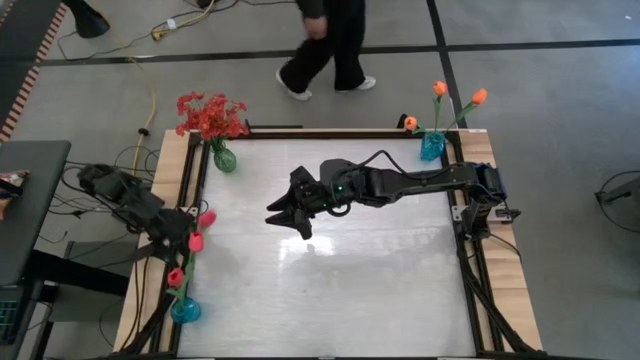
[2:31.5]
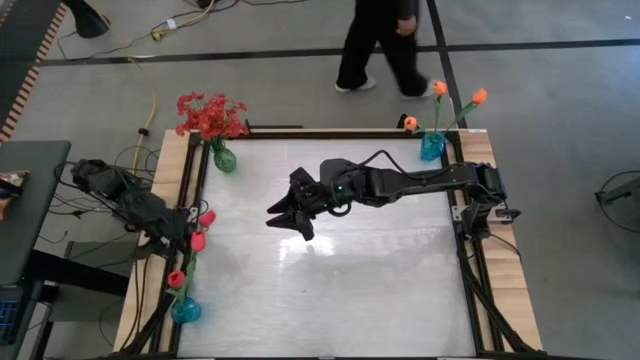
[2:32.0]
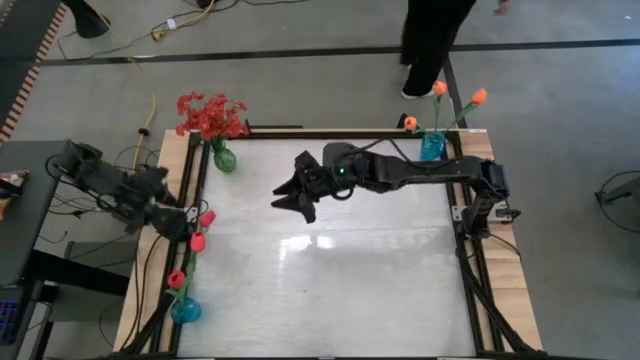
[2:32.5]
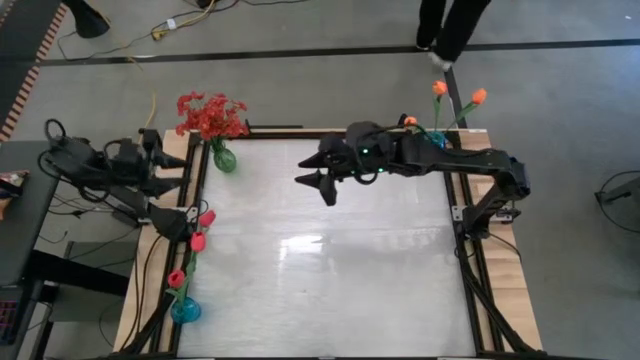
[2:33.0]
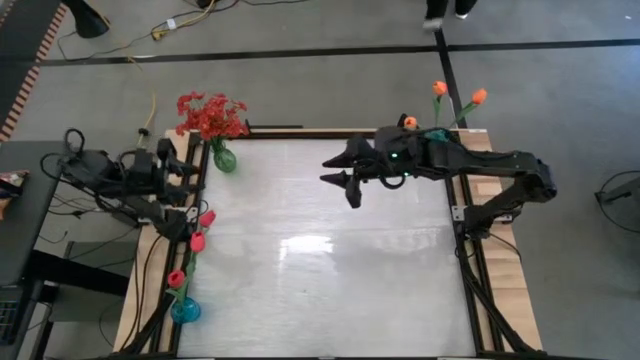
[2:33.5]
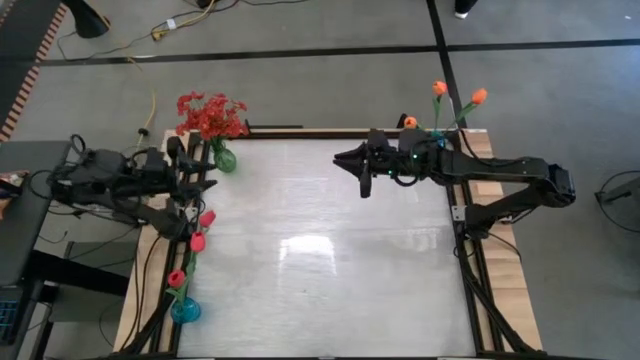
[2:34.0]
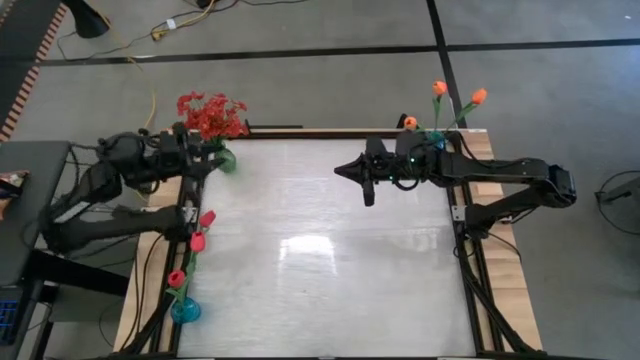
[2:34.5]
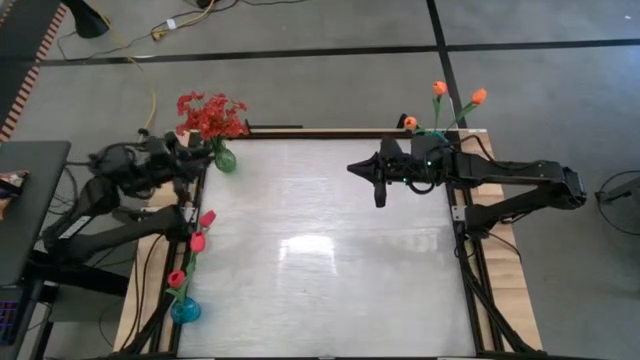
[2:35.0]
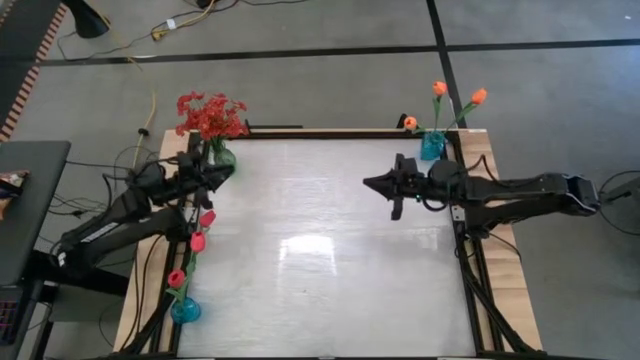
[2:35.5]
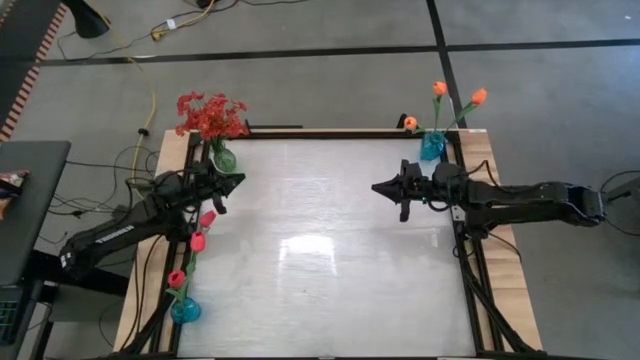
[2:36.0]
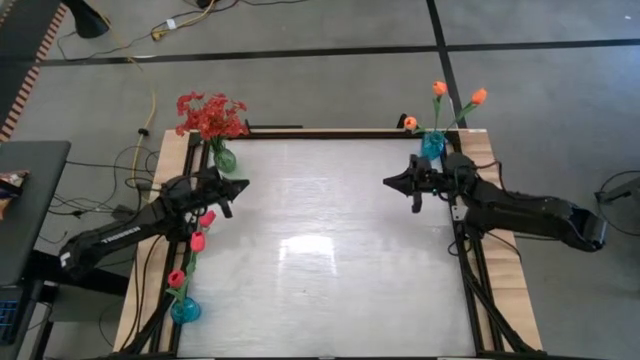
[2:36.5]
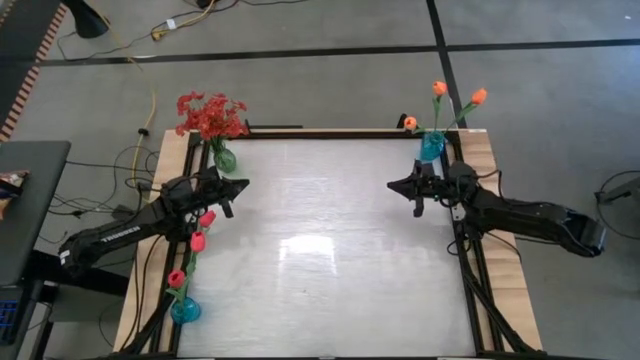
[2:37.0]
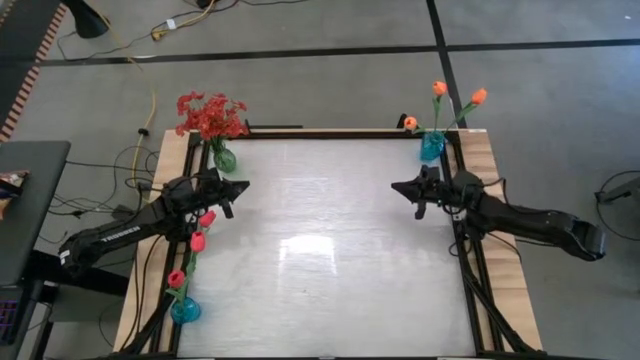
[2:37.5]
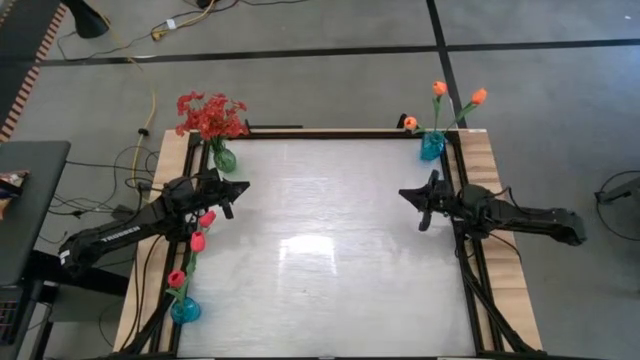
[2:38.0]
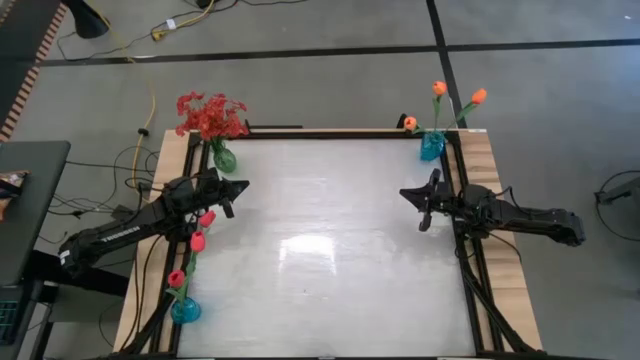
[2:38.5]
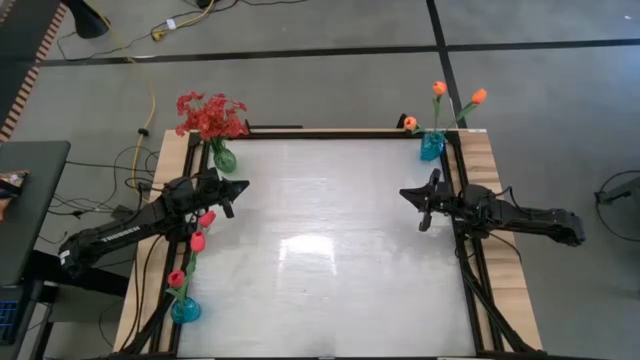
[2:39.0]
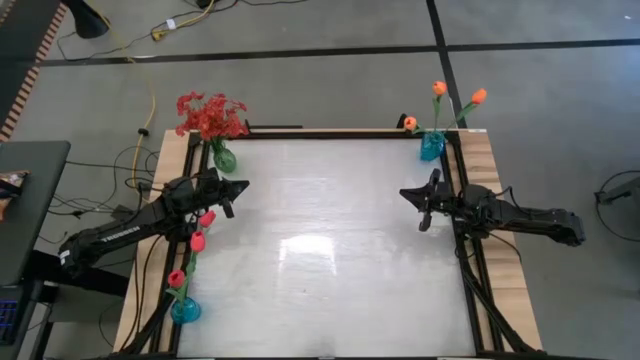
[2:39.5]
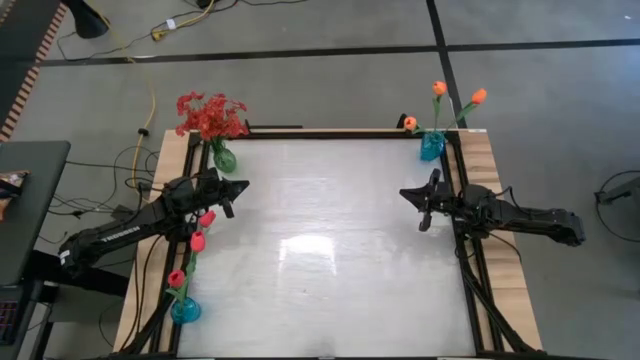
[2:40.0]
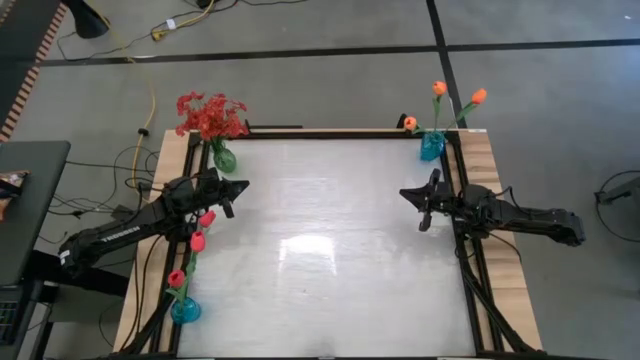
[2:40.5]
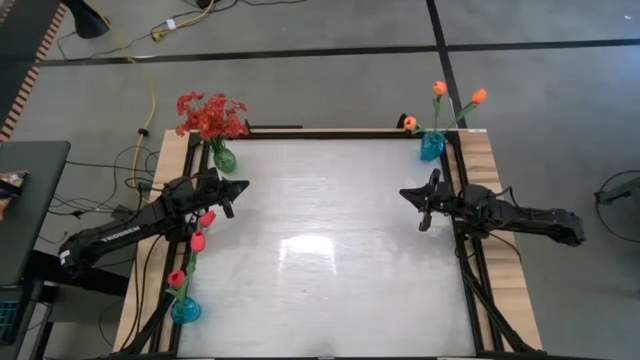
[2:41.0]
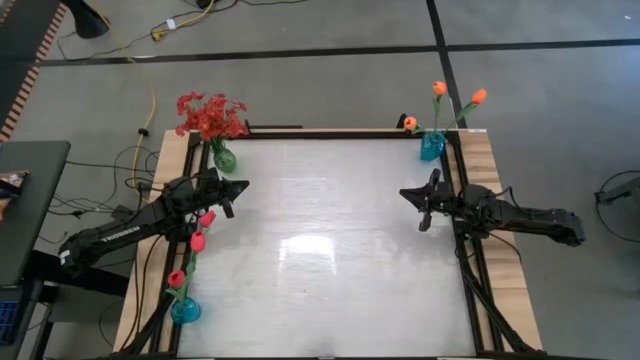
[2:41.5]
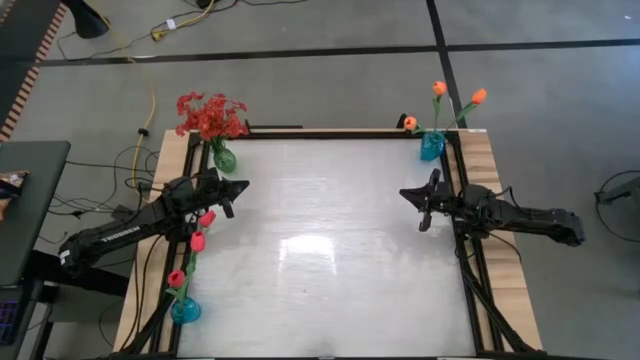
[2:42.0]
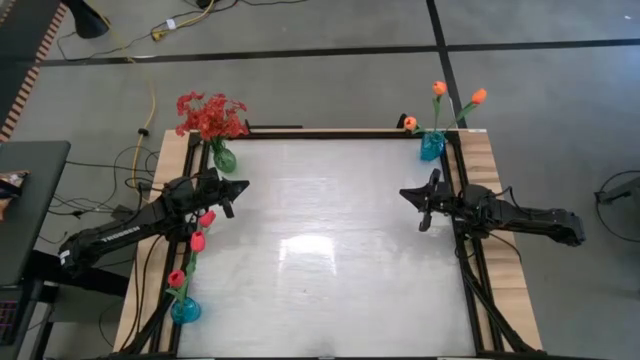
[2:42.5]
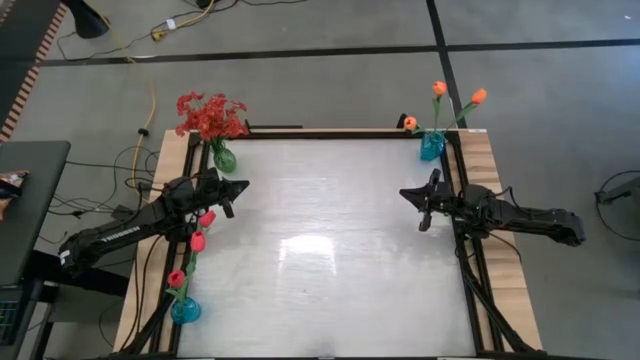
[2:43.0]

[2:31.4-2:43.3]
Task: Sort flowers into vase by color
Return to Home Position

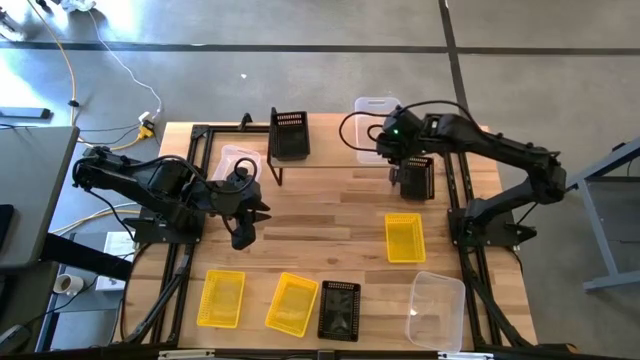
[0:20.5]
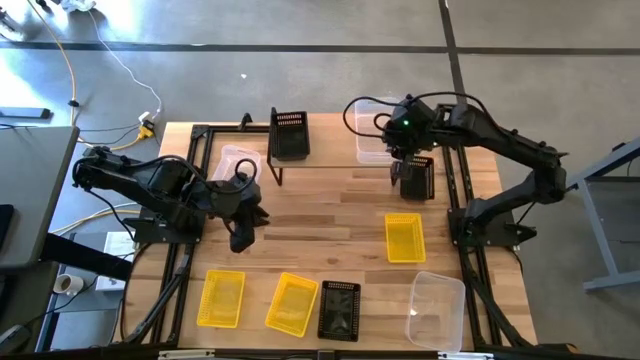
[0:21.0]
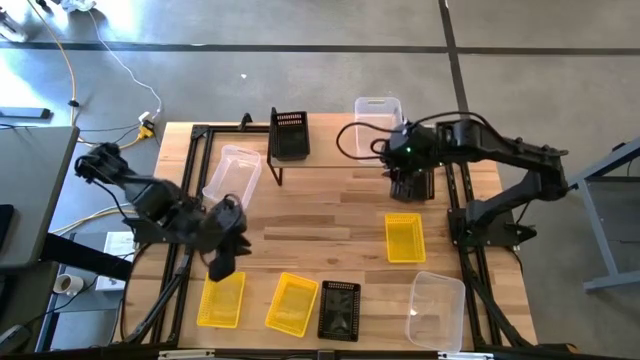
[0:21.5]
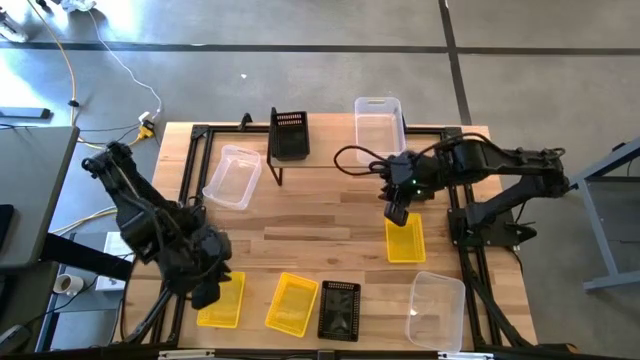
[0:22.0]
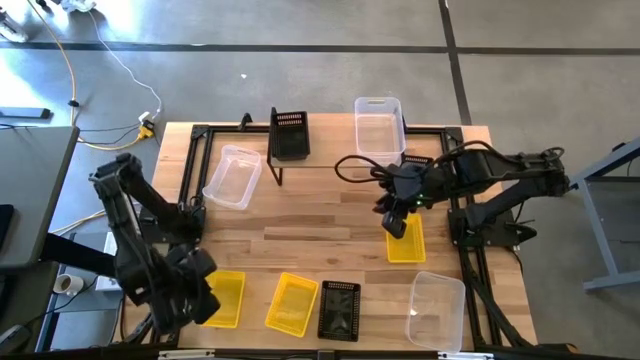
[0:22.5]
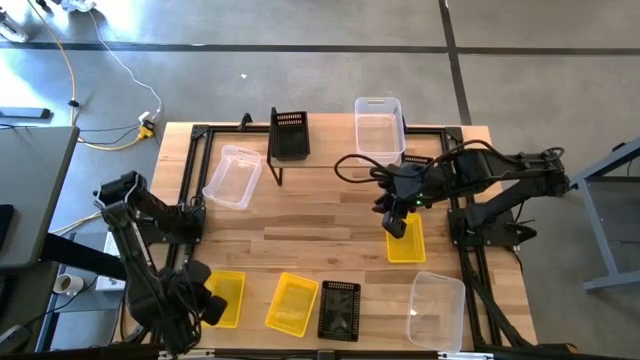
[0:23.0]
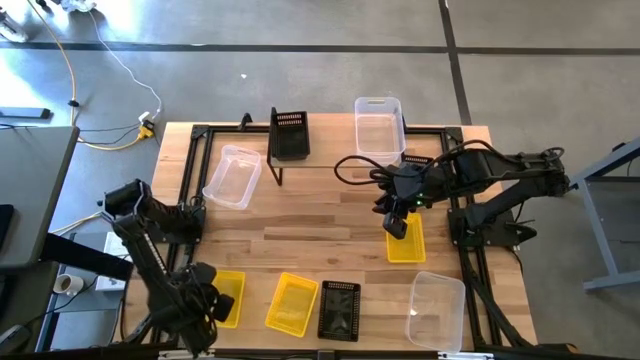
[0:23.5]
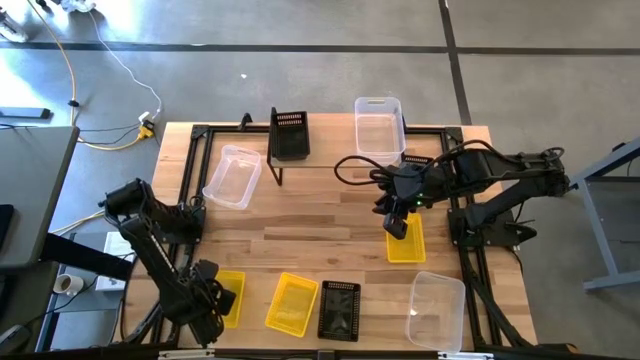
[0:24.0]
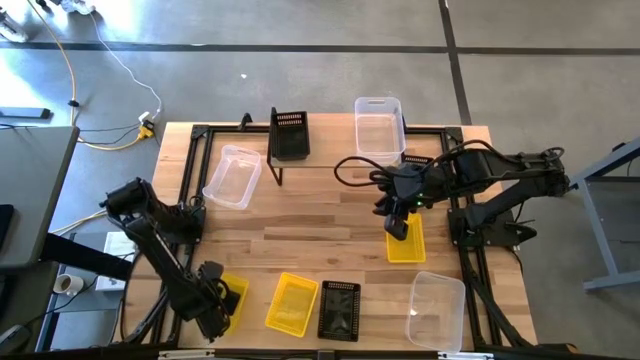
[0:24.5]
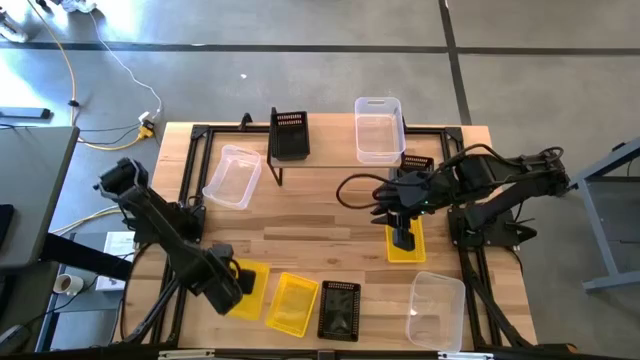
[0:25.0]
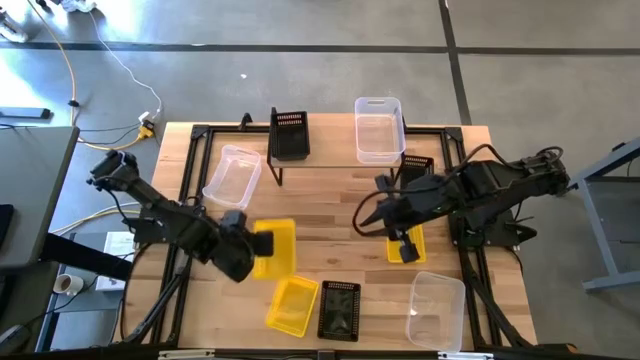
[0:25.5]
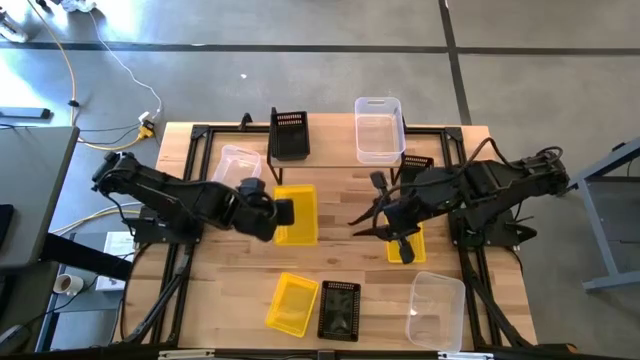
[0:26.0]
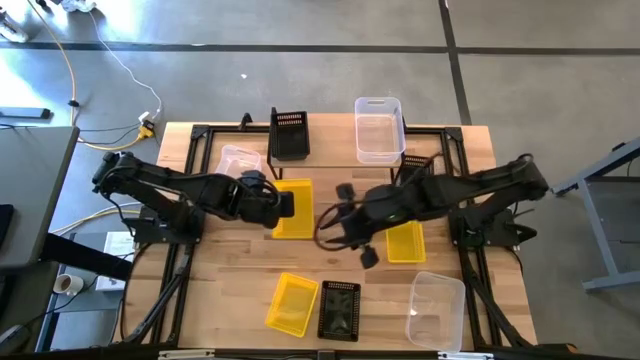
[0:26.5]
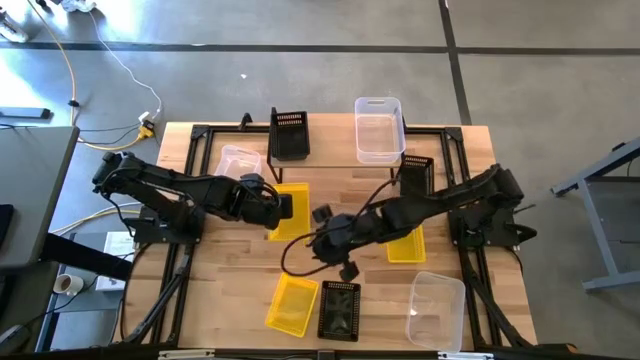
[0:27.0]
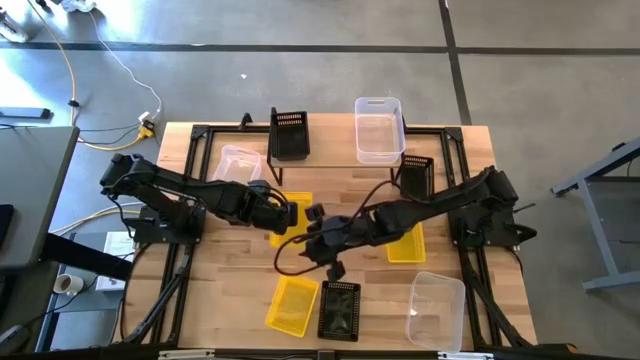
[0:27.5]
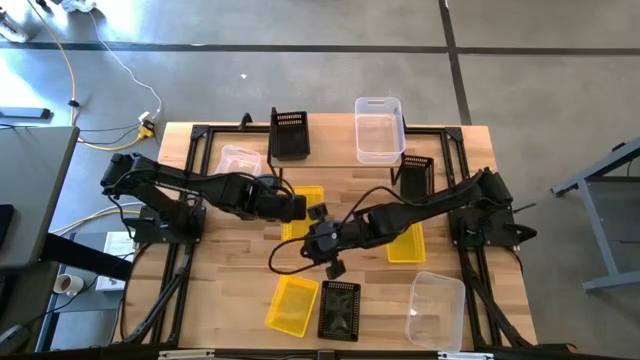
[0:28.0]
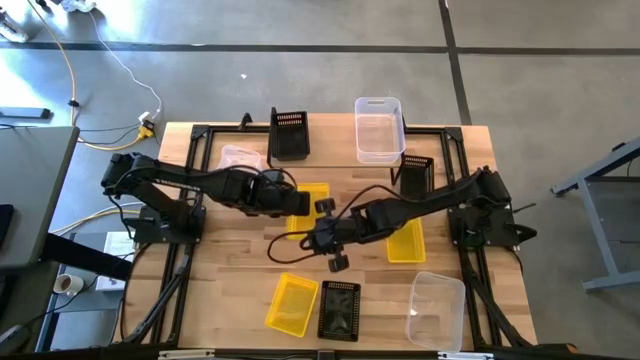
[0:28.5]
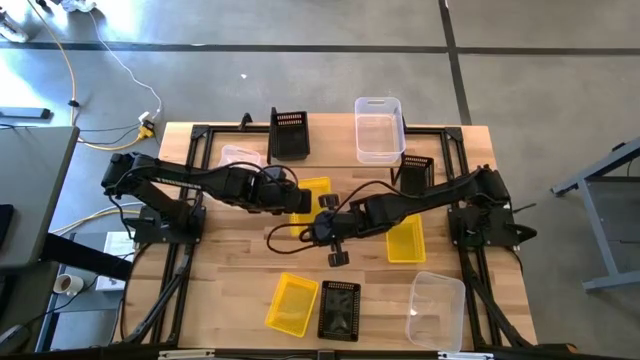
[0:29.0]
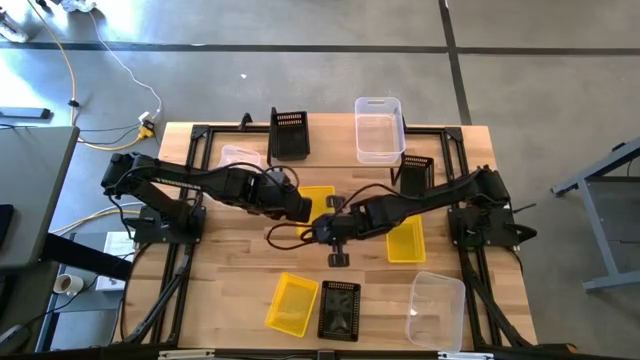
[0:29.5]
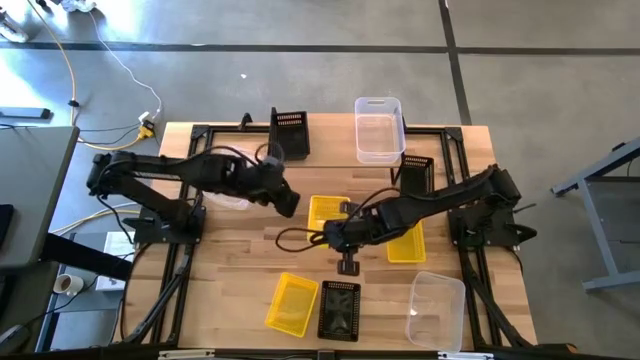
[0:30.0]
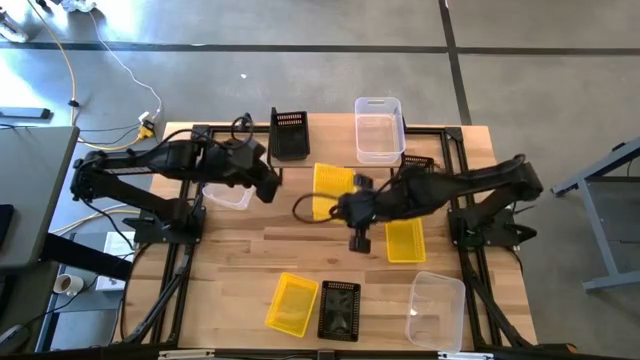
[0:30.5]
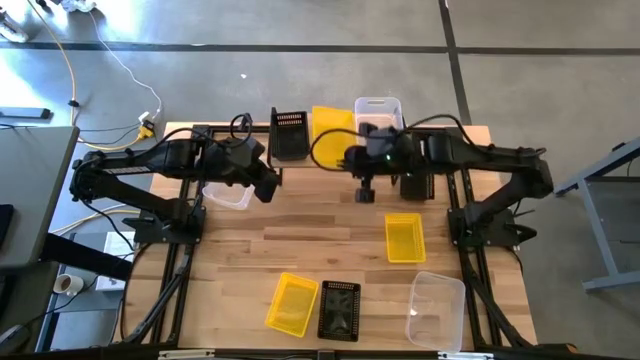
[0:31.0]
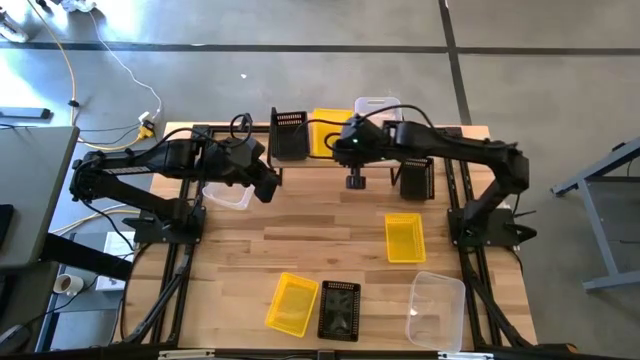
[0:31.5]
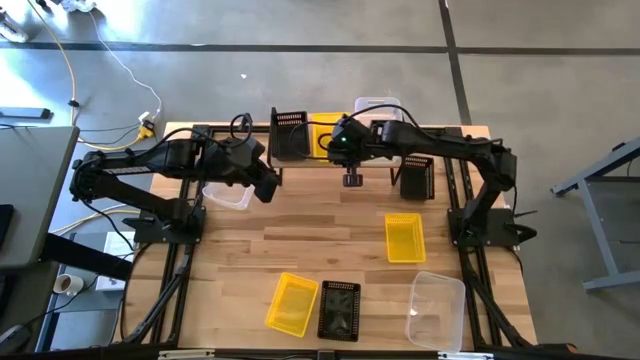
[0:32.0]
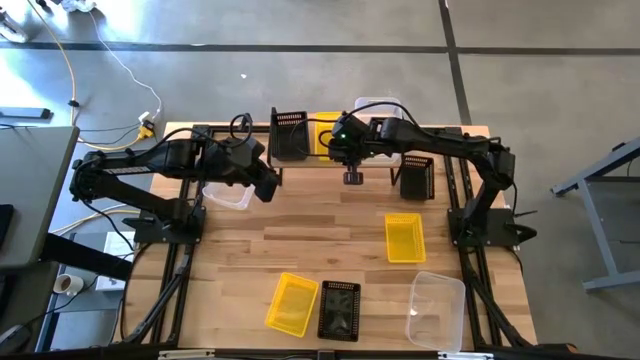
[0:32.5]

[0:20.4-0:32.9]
Task: Stack baskets on shelf by color
Put the bottom left yellow basket on the shelf
